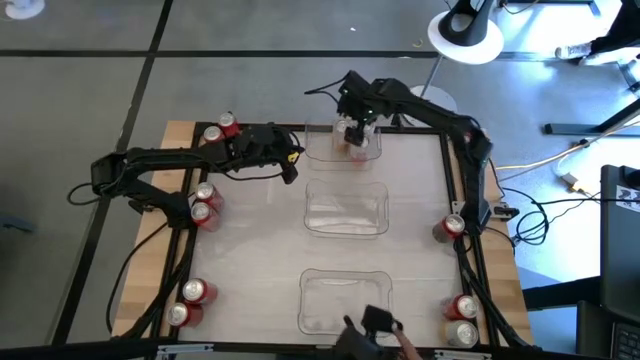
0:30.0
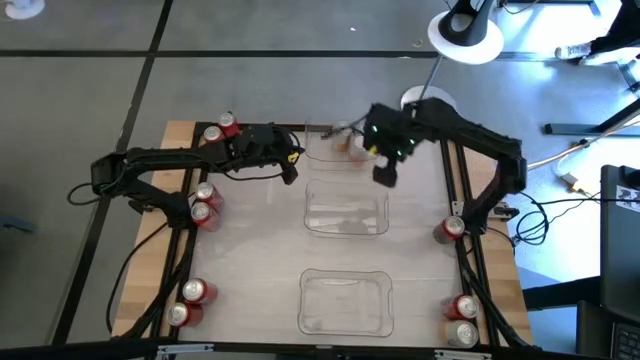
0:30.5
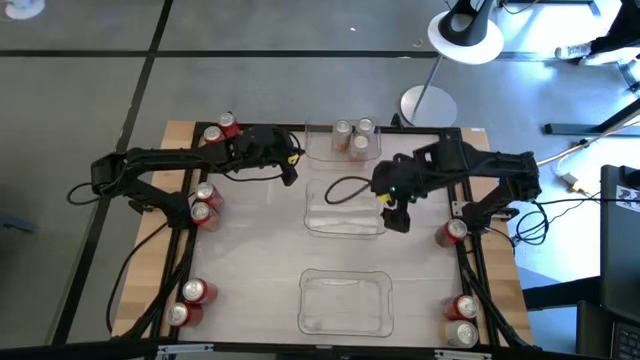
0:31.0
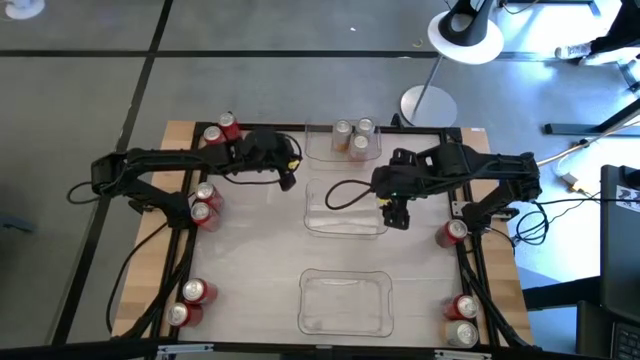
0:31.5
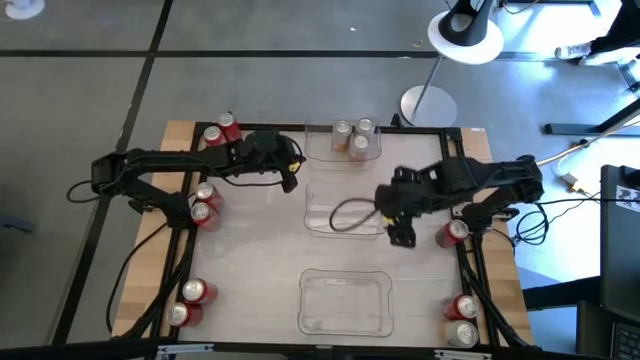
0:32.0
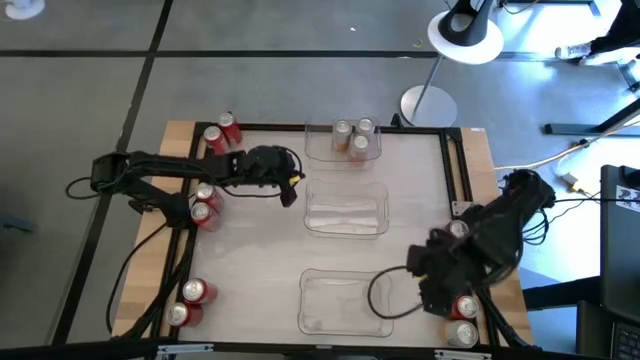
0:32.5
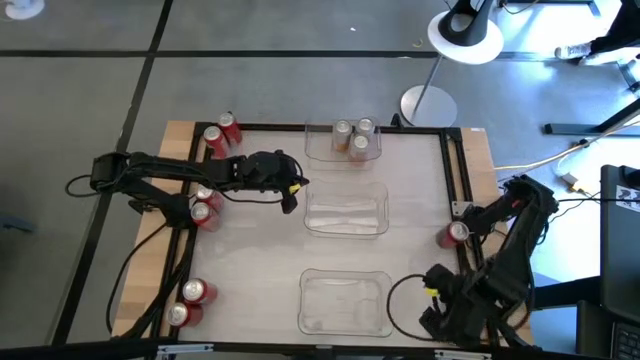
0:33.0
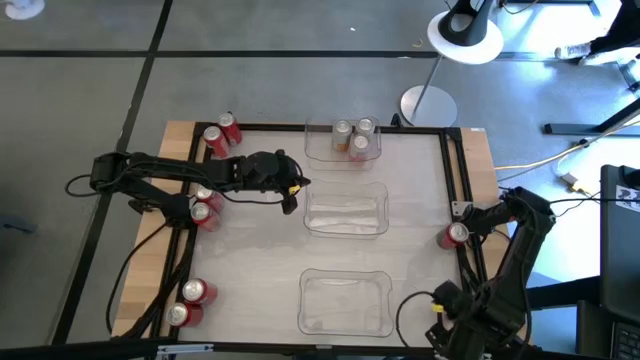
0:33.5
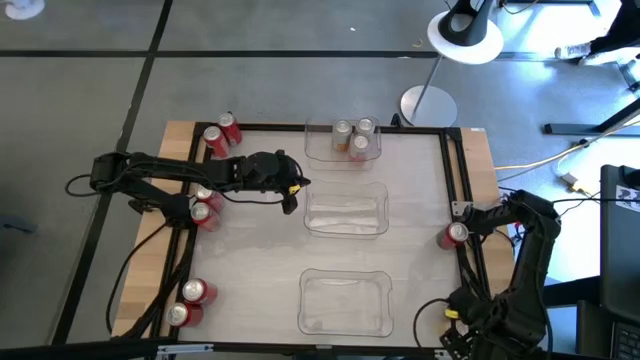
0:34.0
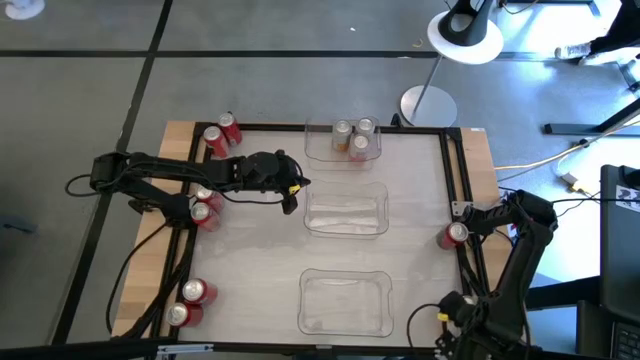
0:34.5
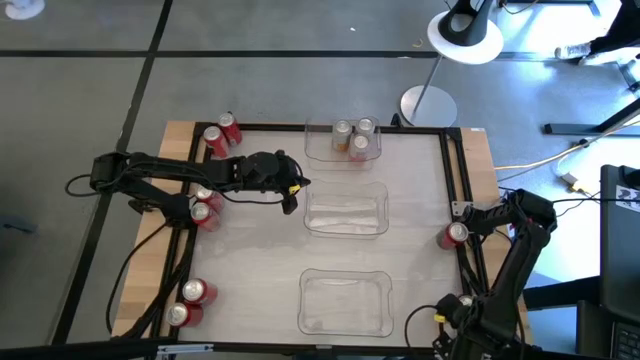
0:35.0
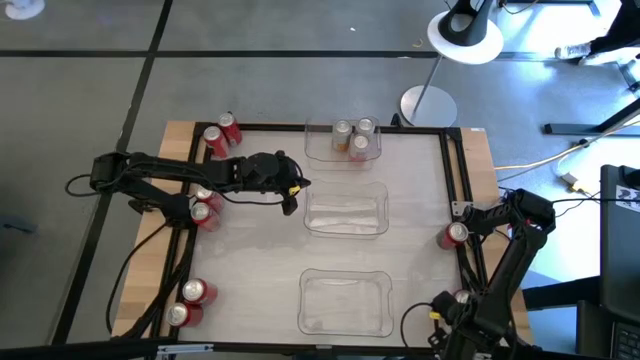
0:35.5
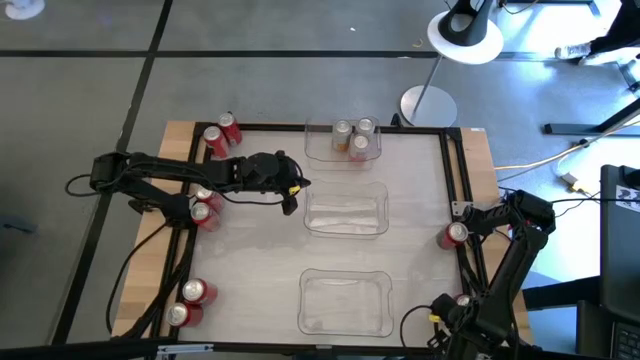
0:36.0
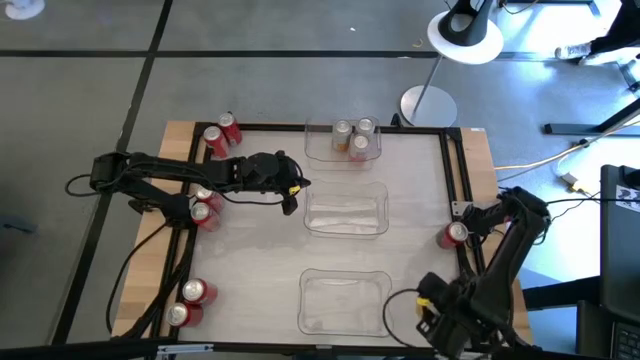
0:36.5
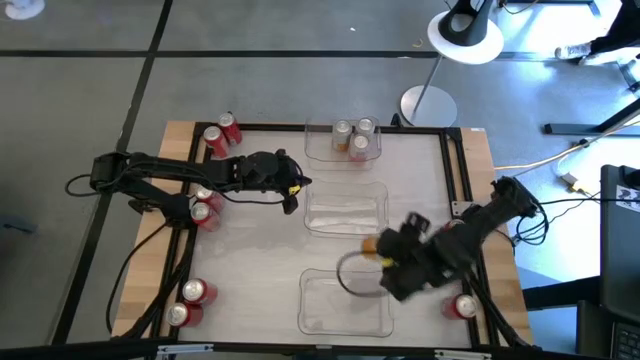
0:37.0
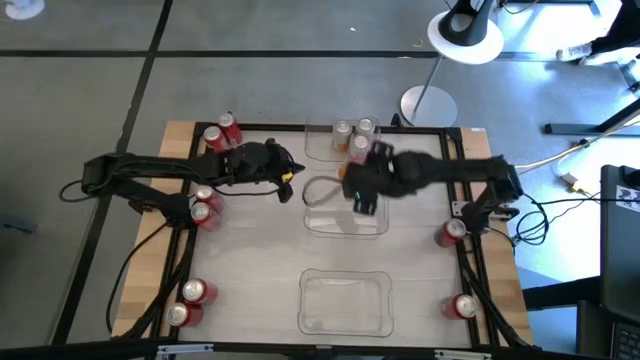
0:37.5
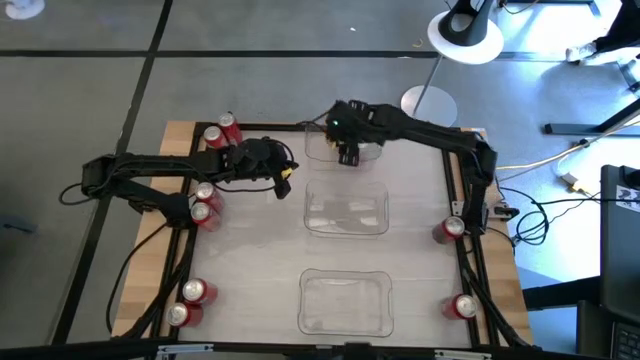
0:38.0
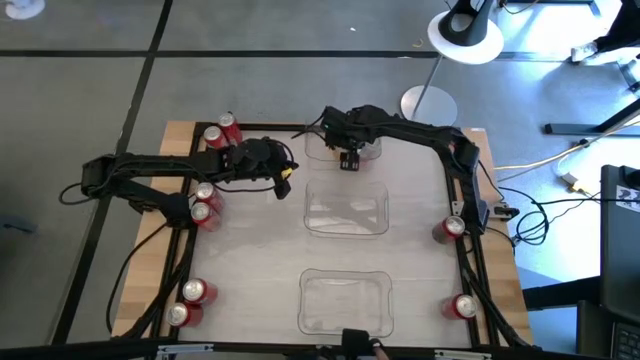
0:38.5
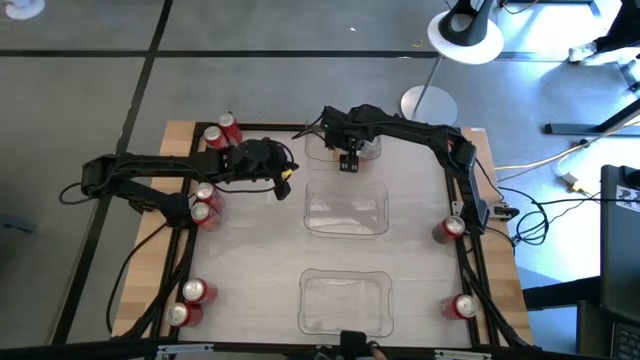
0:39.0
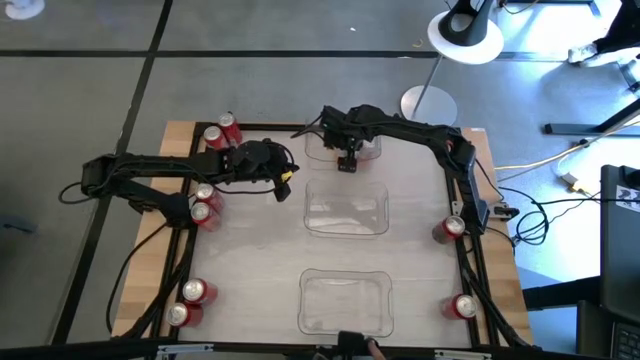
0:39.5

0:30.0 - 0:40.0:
Task: Sort soda cans
Put the yellow white soda can into the top transparent bin

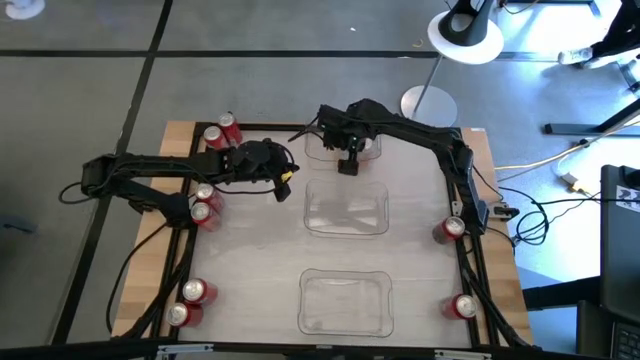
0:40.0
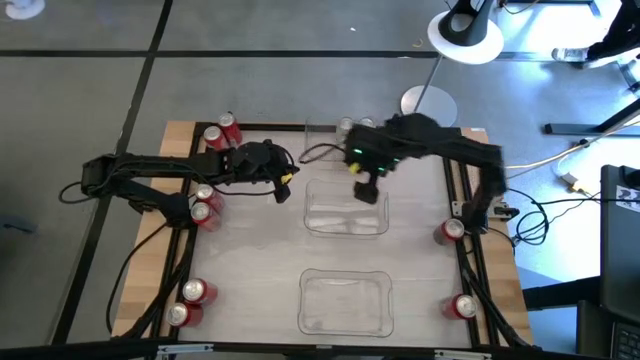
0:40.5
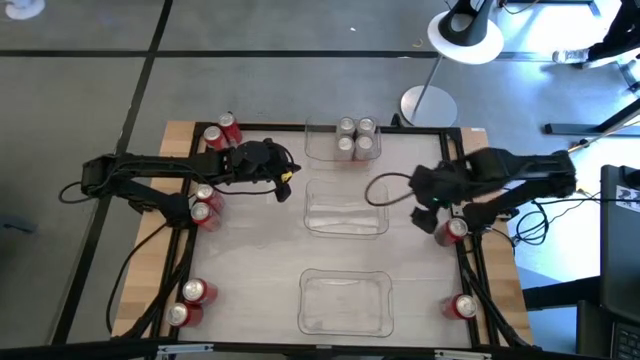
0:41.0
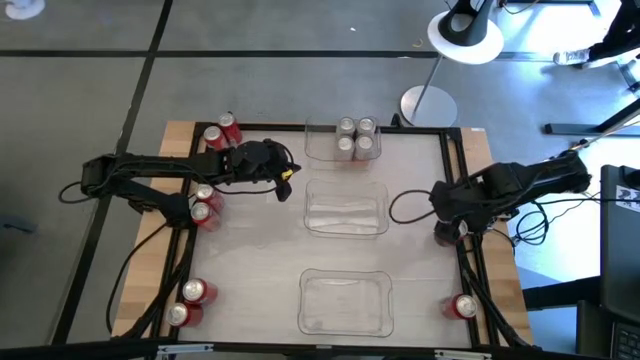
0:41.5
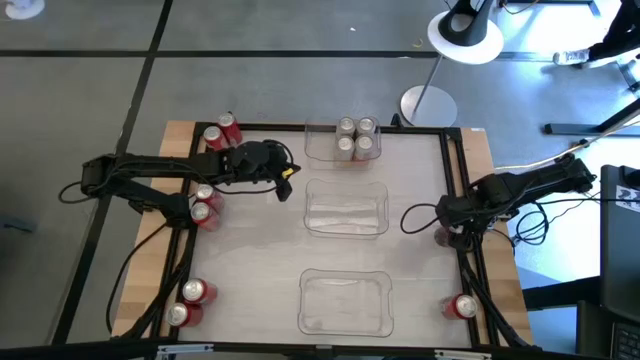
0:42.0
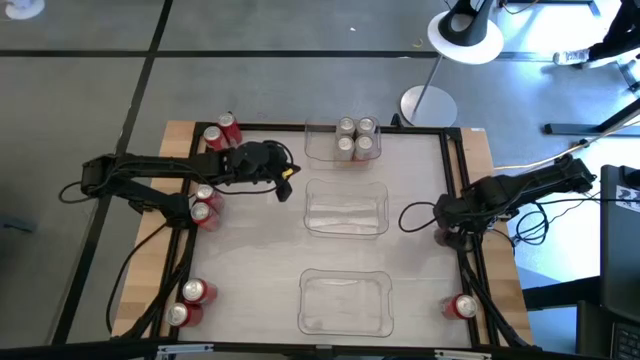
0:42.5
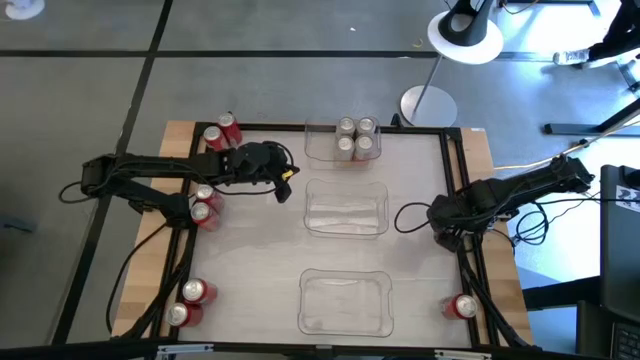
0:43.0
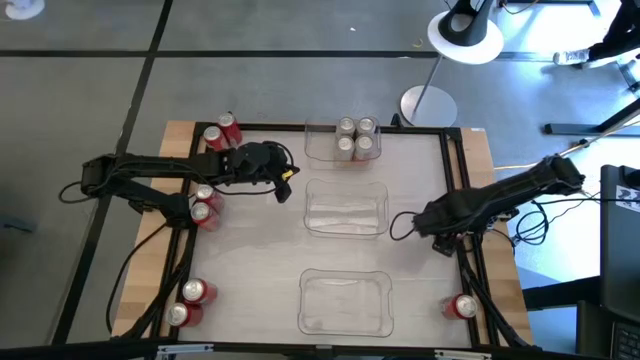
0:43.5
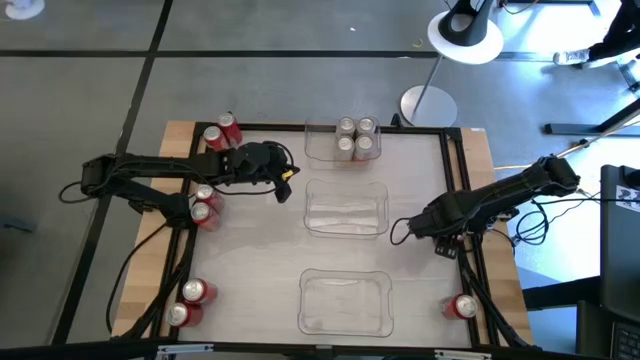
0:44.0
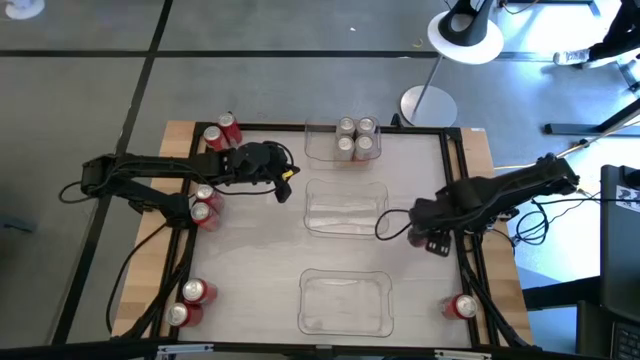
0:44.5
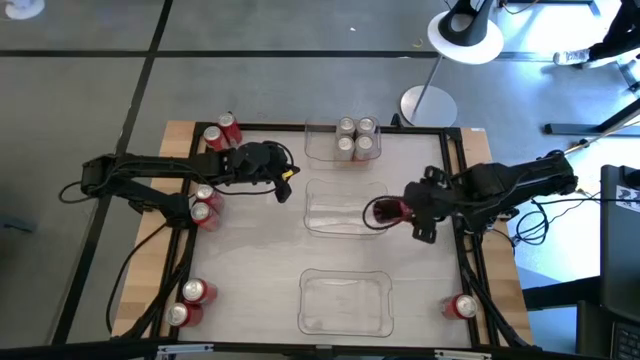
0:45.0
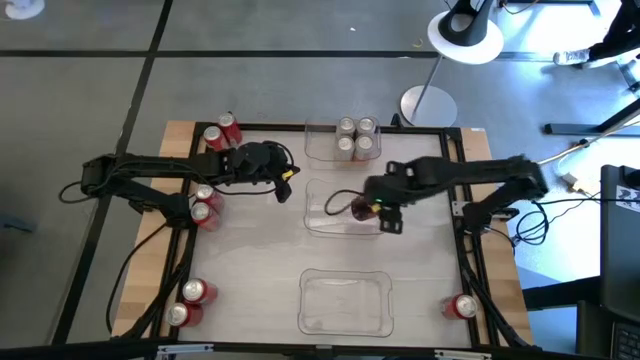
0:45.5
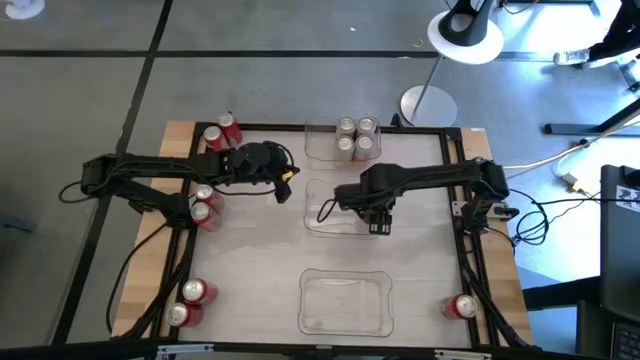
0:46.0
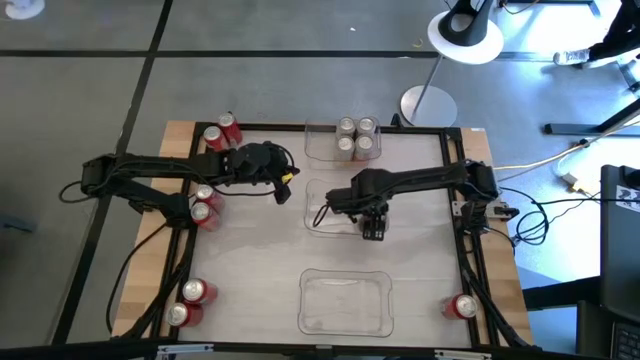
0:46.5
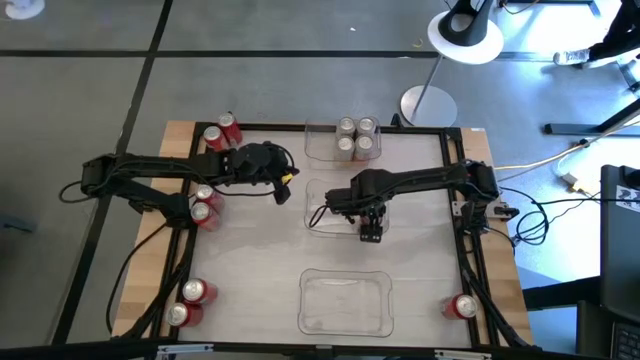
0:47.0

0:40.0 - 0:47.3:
Put the middle right red black soda can into the middle transparent bin

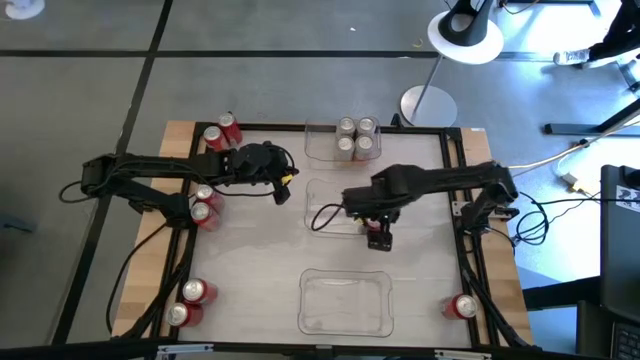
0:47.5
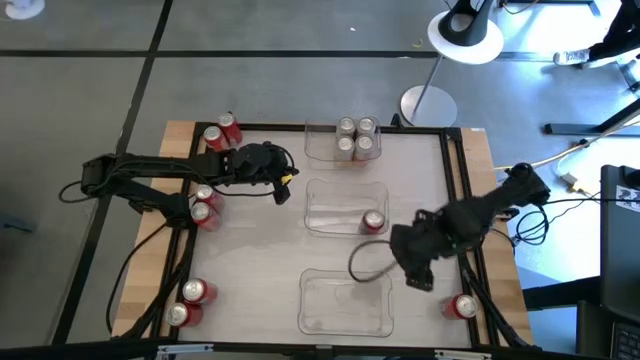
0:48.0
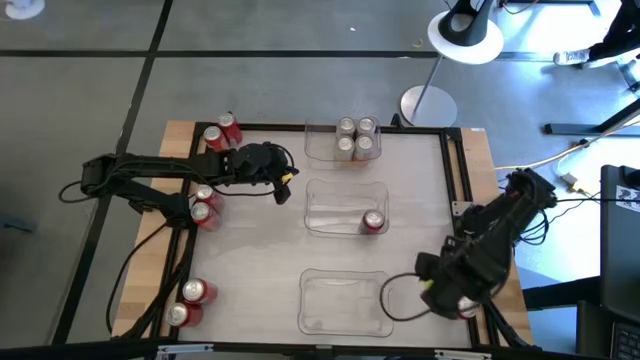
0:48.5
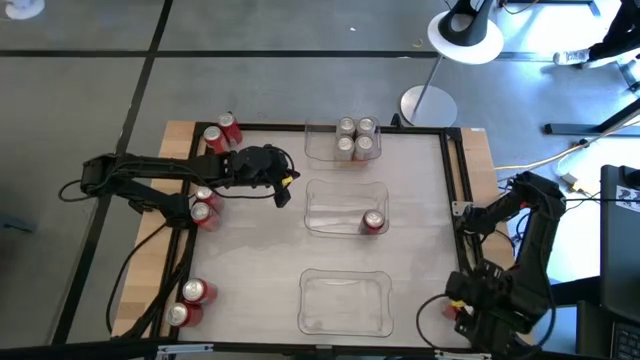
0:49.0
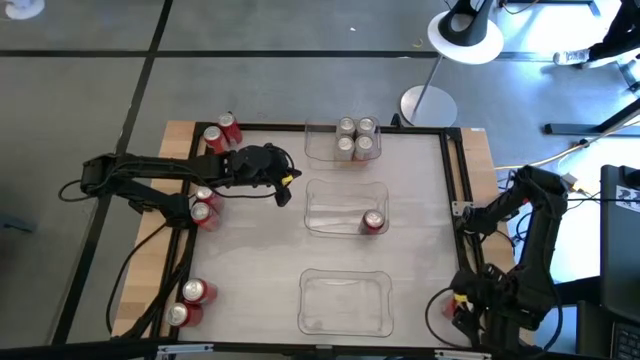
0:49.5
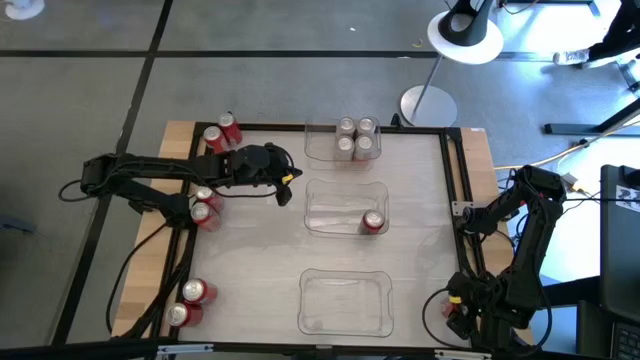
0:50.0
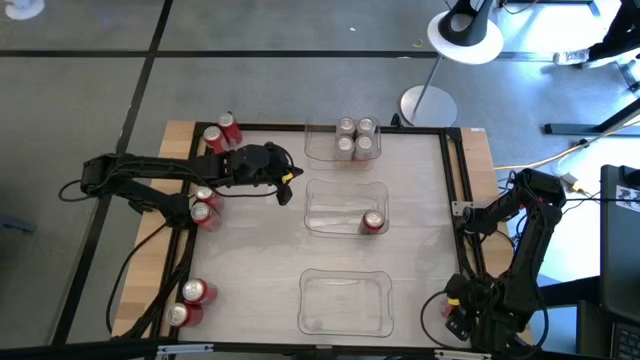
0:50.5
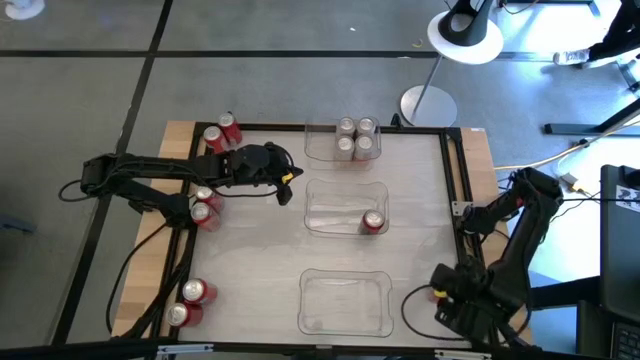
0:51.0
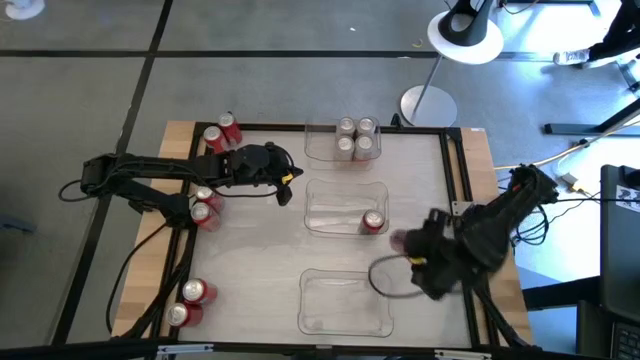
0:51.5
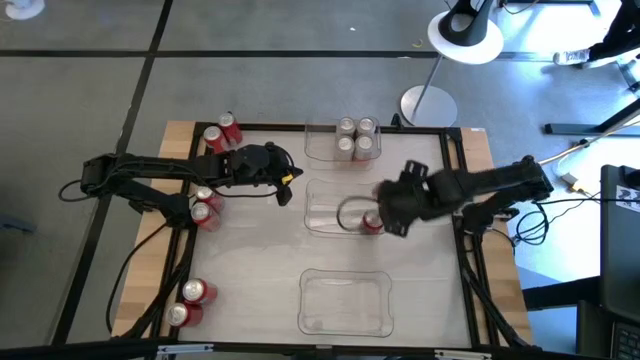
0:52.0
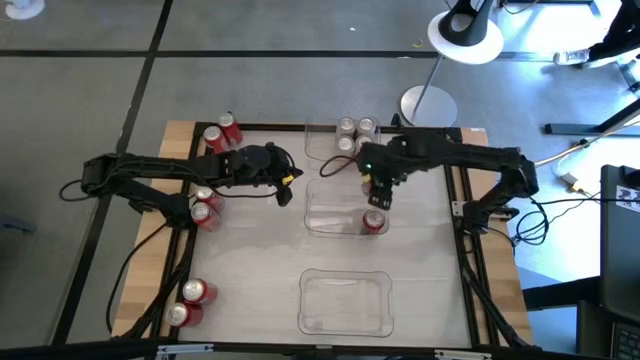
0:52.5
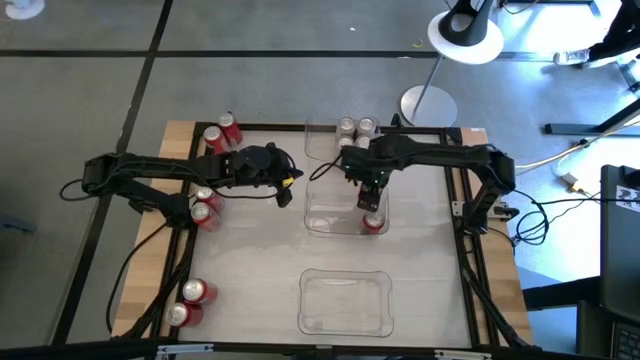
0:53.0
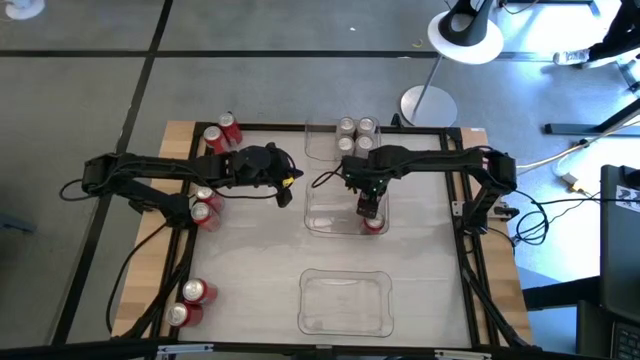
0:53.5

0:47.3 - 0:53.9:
Put the bottom right red black soda can into the middle transparent bin
